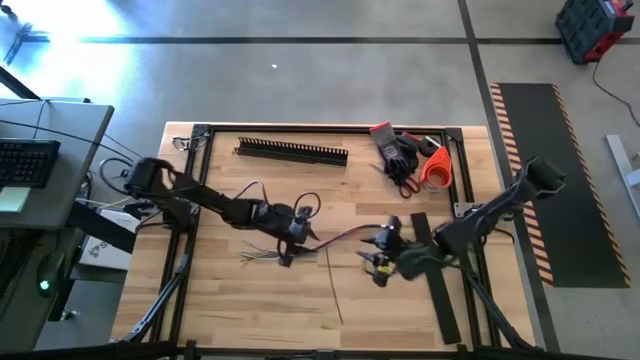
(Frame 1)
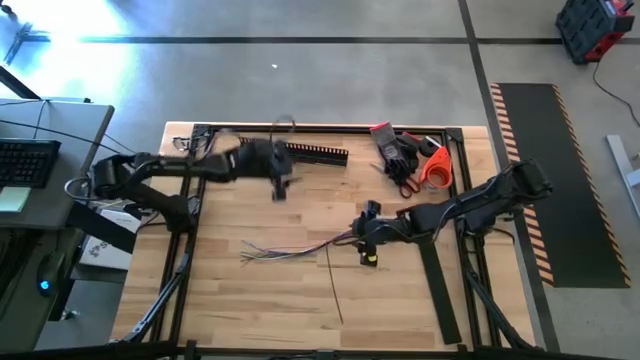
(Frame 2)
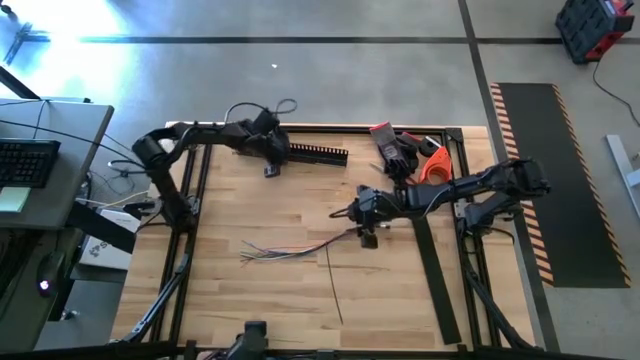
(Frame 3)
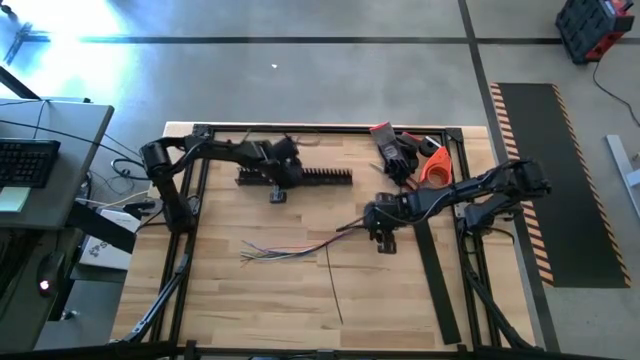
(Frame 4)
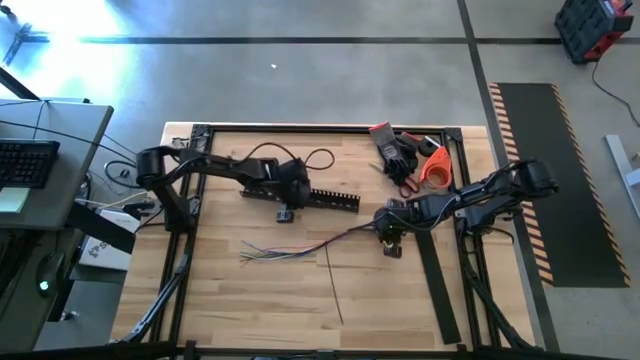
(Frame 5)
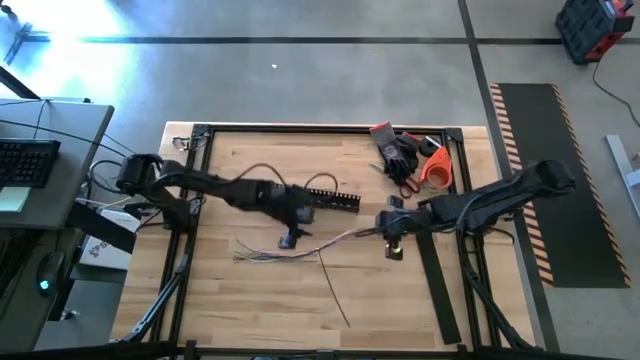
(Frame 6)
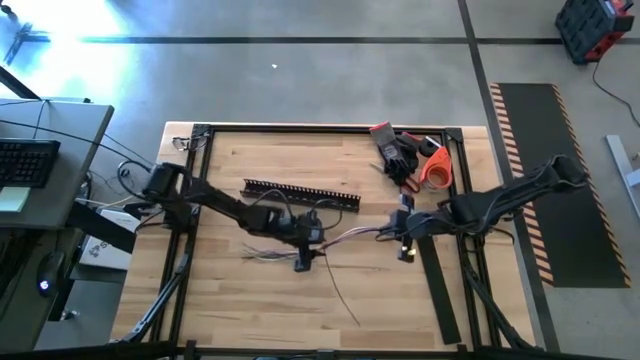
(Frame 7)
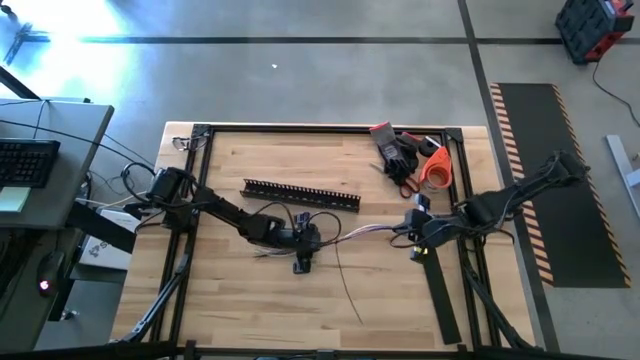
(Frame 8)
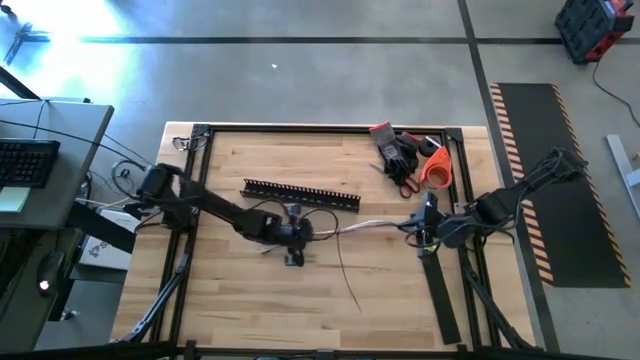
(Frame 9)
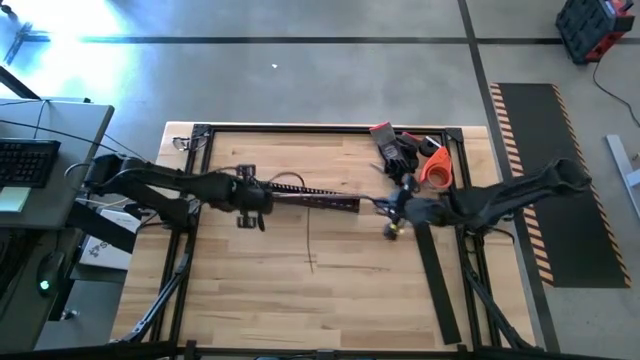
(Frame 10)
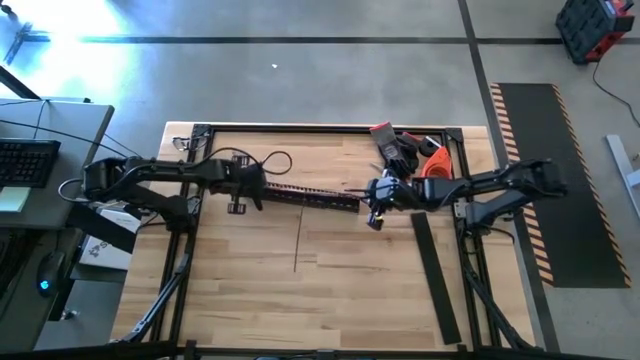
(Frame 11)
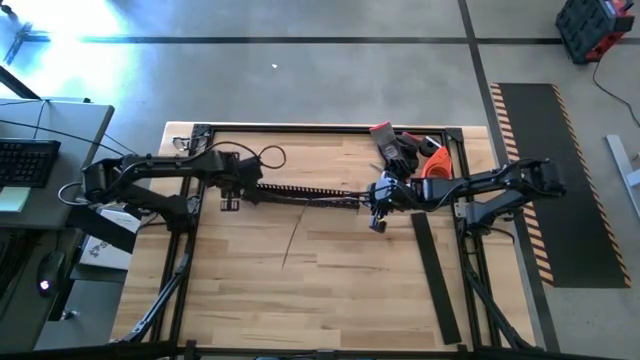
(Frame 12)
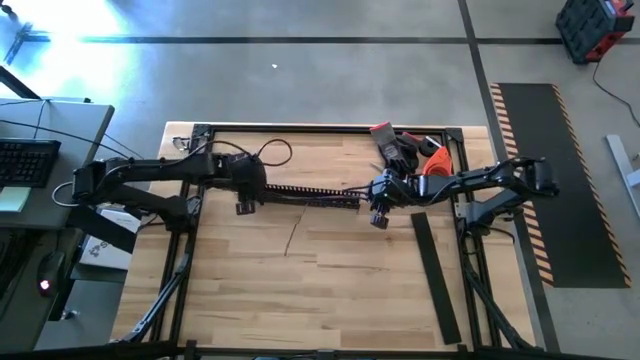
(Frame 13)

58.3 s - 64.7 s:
Task: Ziptie cables
Put the zip-tied cables into the black cable duct

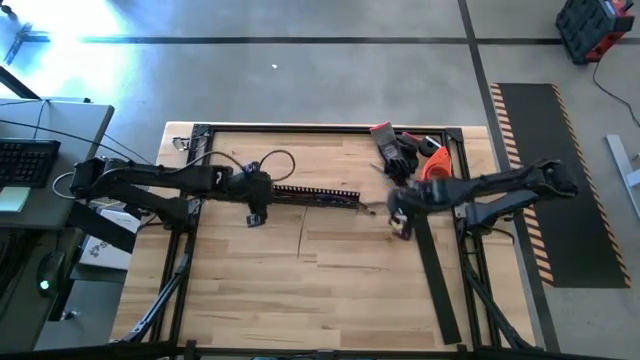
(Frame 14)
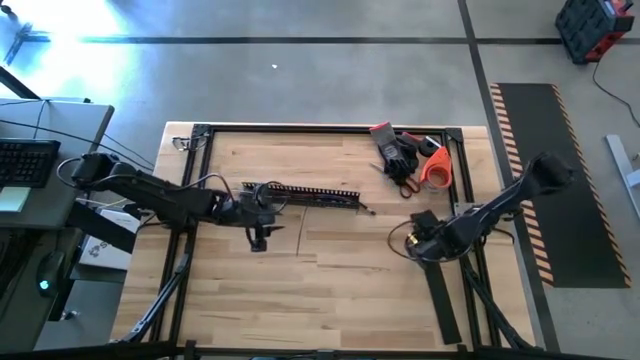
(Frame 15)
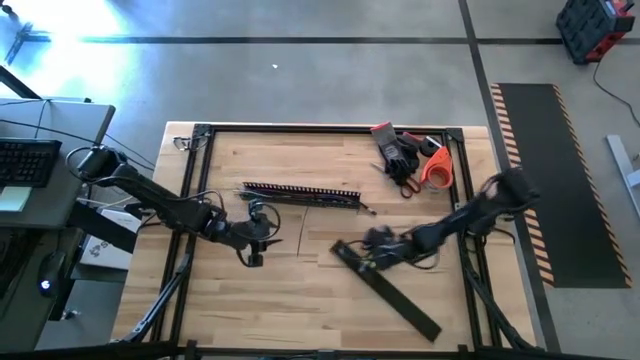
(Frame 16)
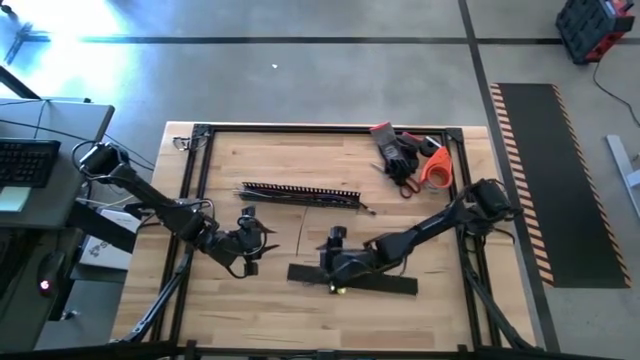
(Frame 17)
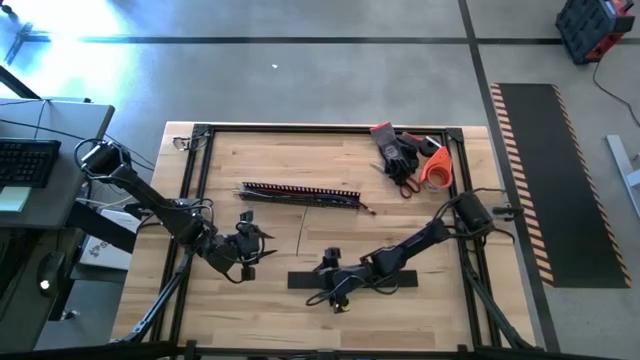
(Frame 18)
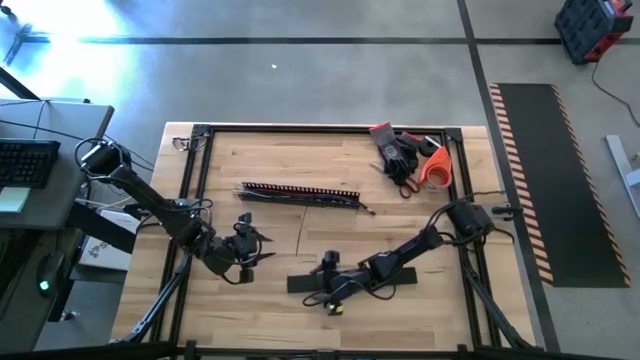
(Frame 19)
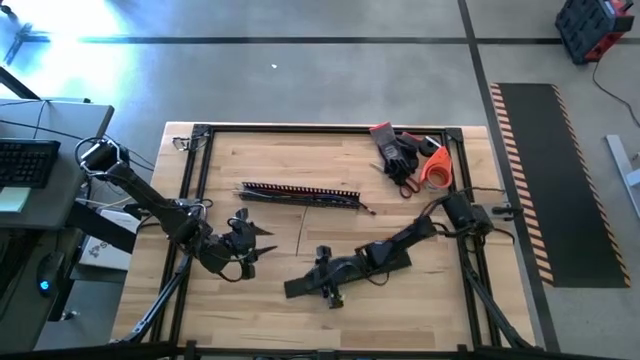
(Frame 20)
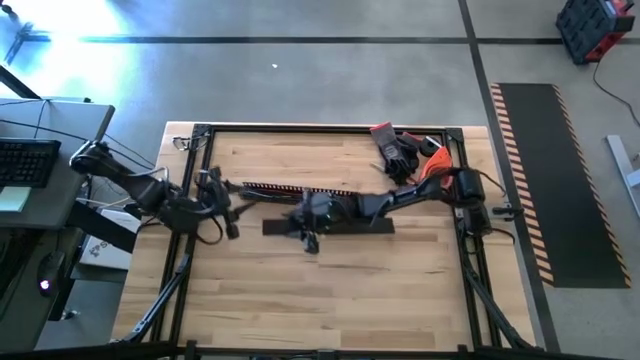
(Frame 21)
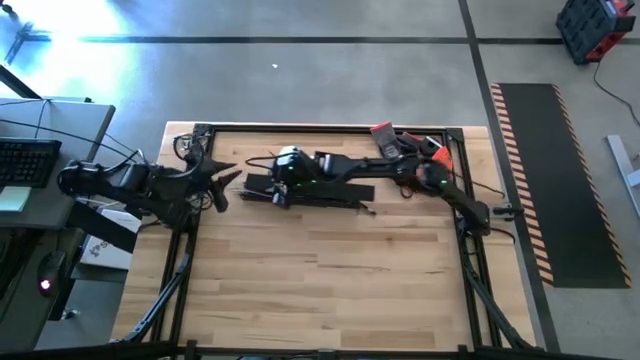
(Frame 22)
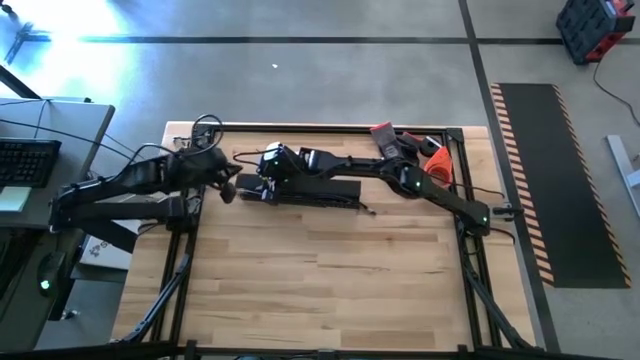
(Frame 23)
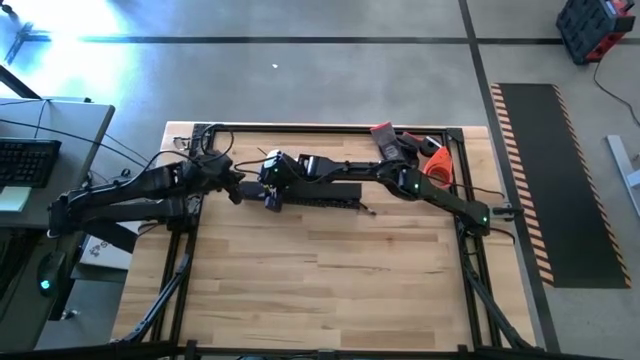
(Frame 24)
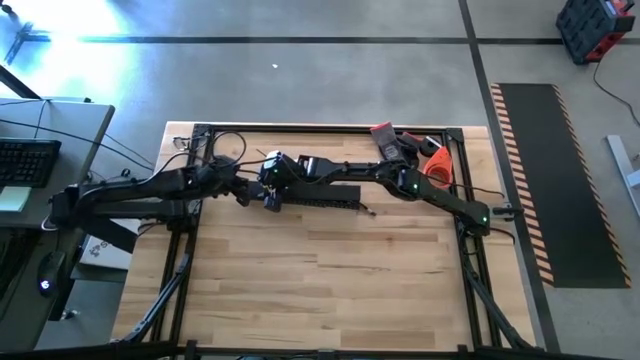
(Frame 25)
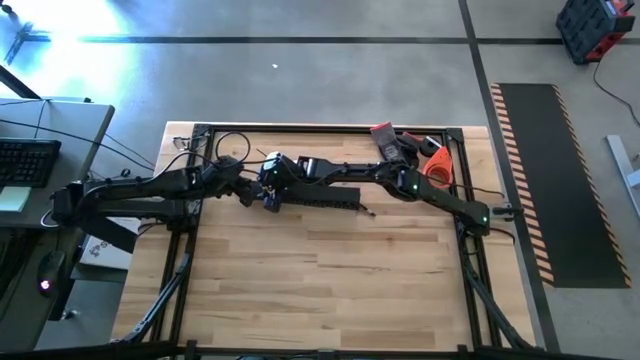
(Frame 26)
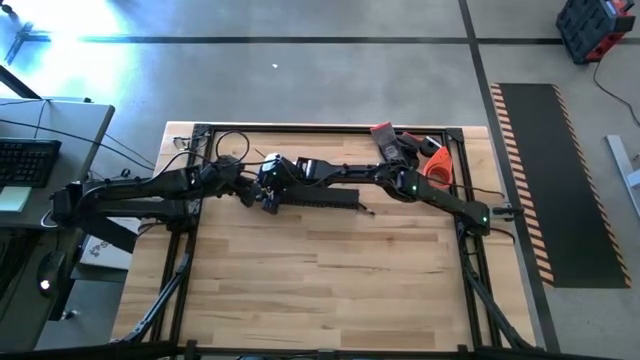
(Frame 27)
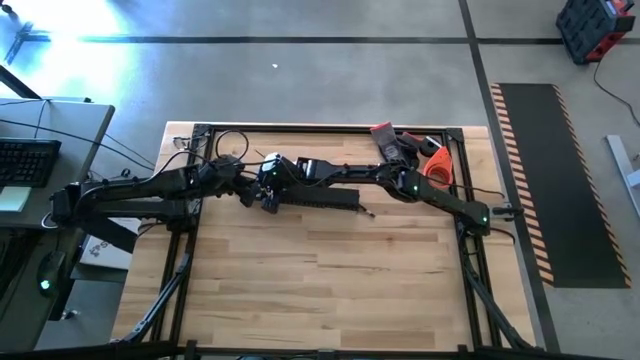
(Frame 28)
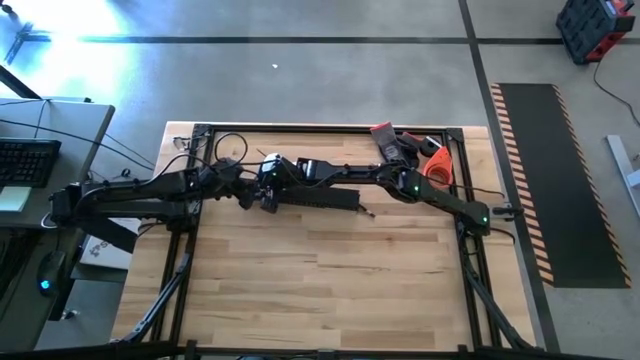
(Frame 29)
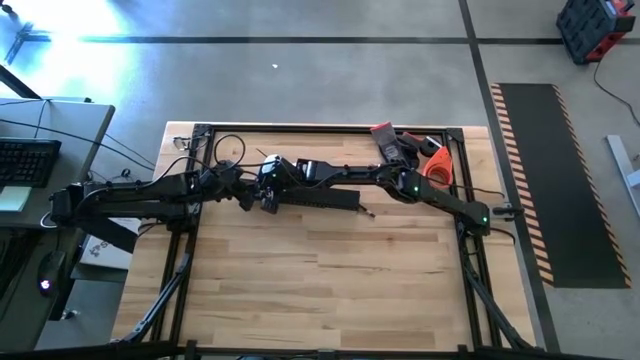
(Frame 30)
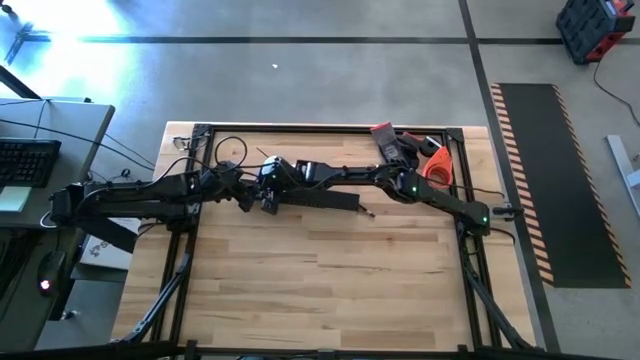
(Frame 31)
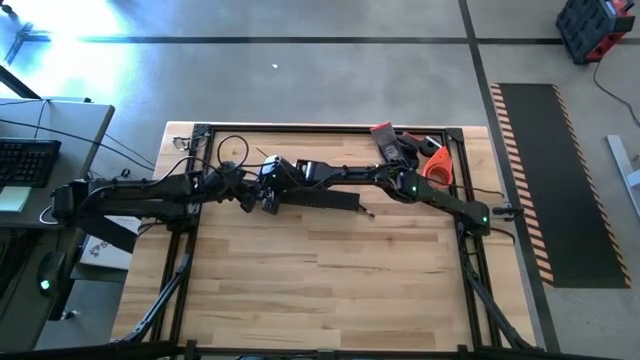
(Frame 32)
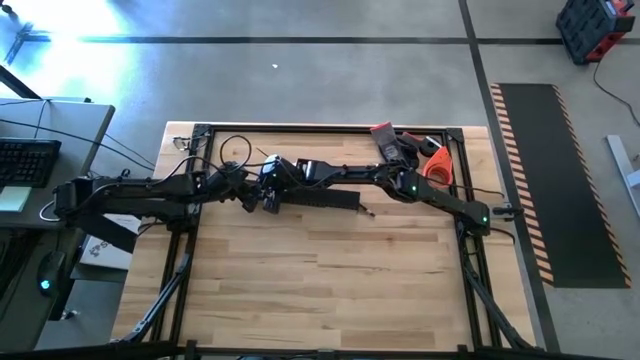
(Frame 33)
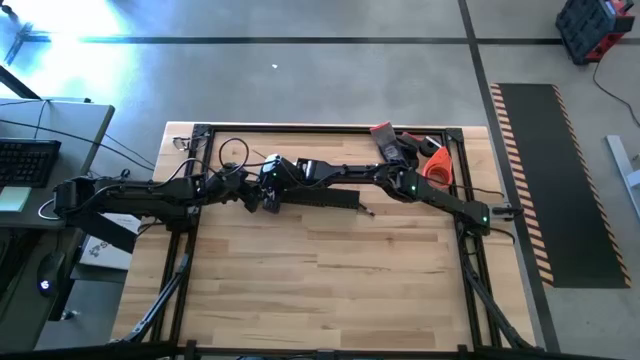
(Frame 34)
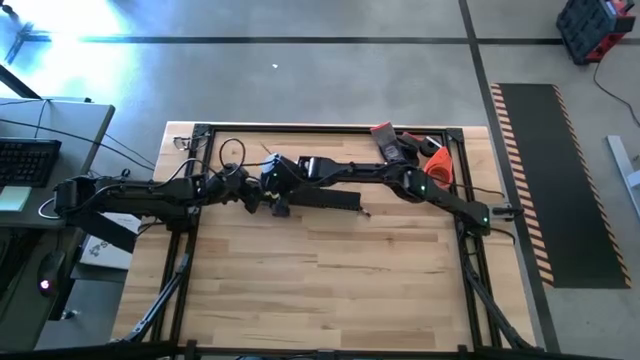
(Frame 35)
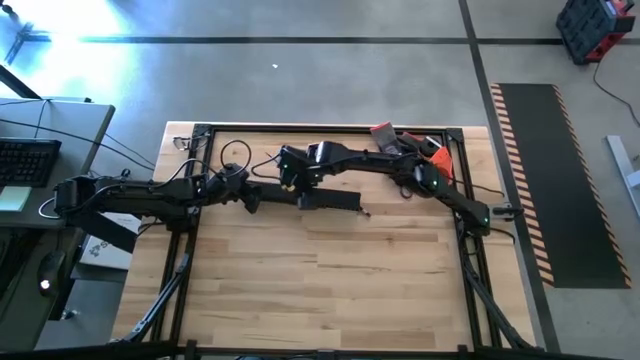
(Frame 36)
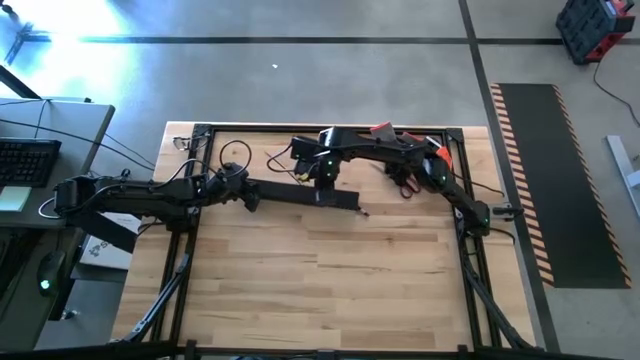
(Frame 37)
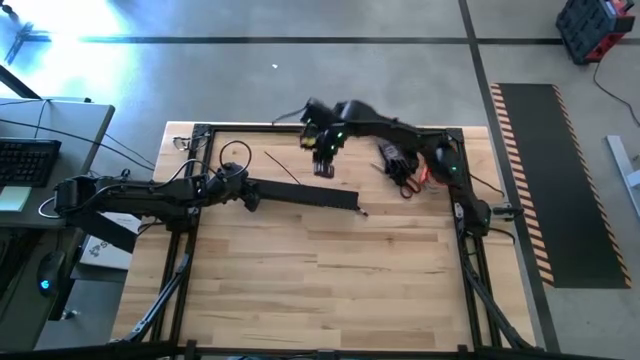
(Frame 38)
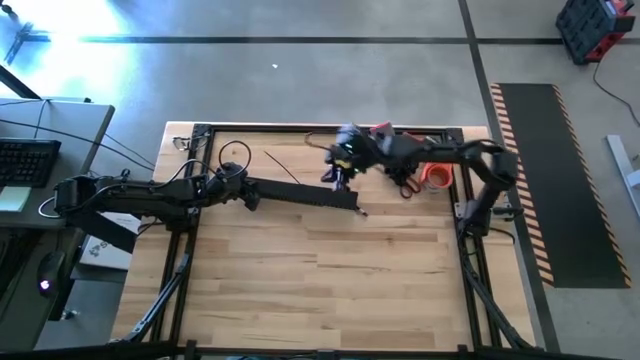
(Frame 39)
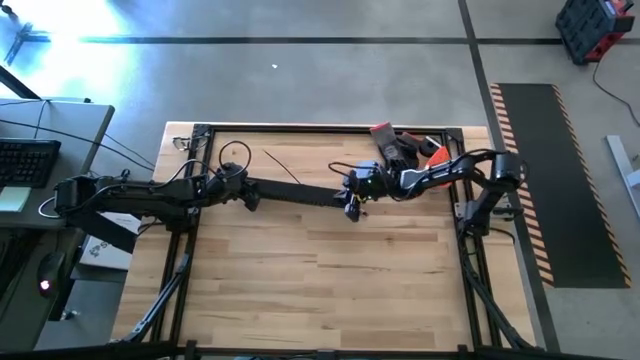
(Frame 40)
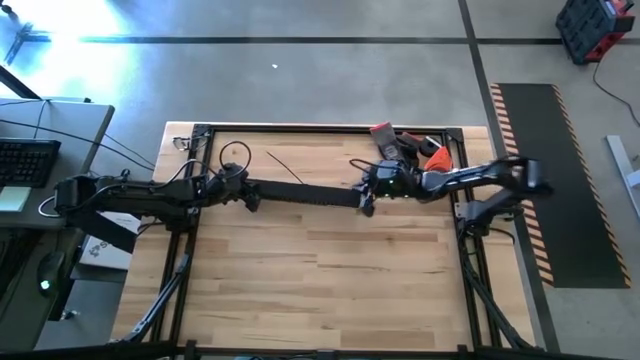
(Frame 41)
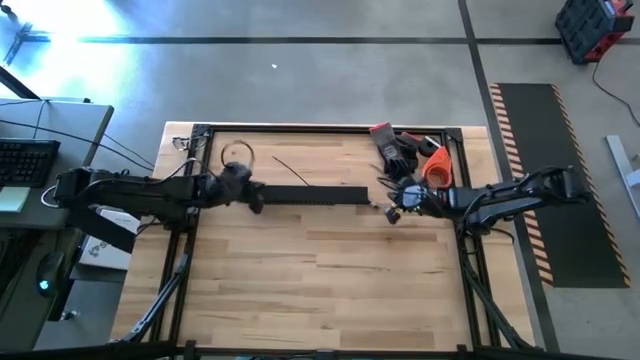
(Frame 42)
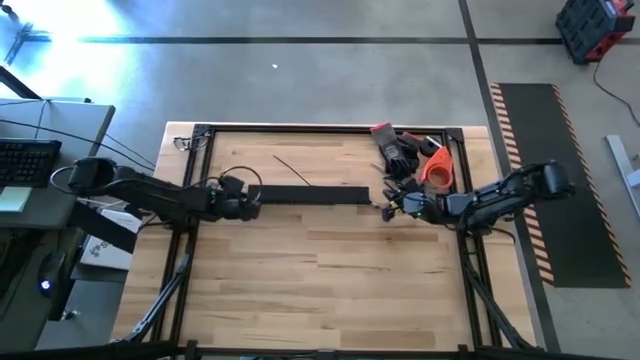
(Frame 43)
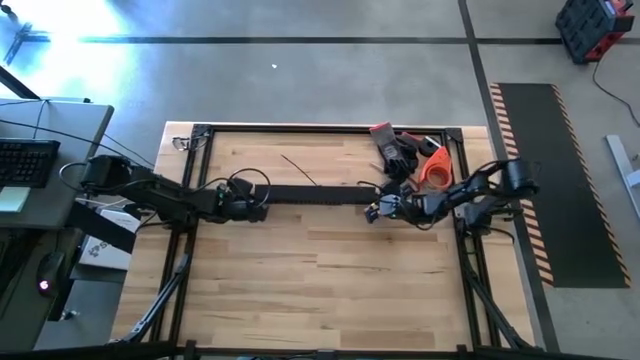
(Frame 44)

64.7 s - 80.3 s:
Close the black cable duct cover
